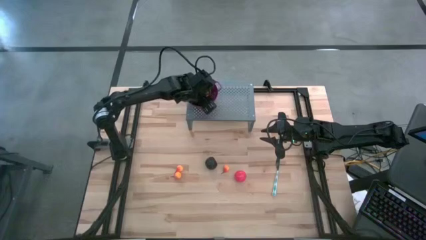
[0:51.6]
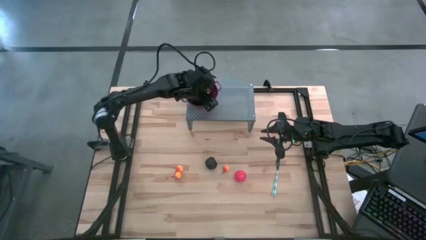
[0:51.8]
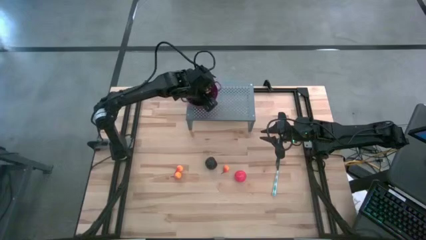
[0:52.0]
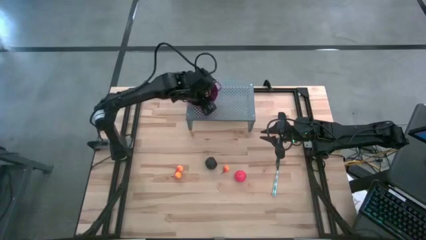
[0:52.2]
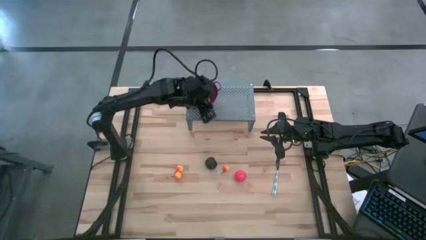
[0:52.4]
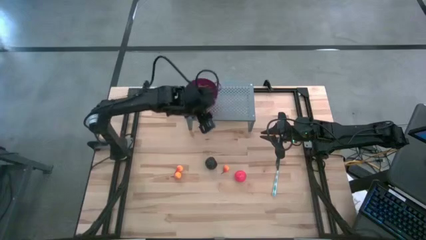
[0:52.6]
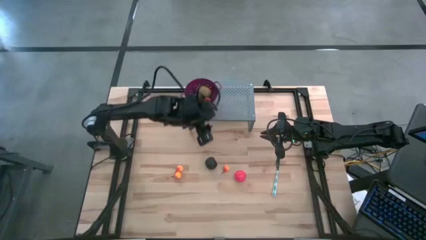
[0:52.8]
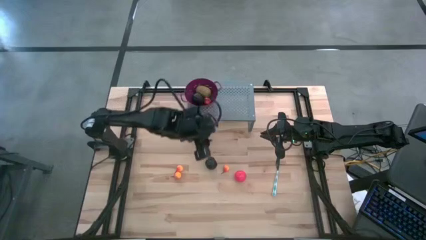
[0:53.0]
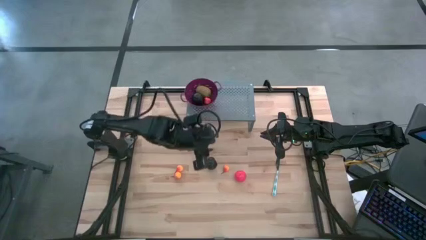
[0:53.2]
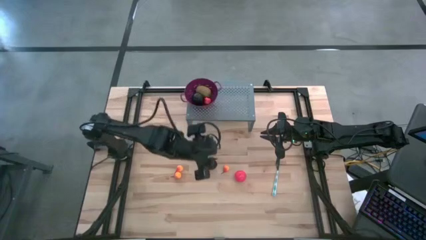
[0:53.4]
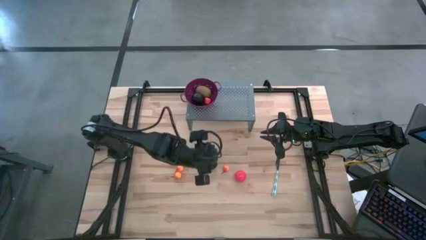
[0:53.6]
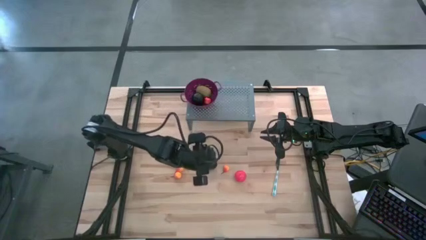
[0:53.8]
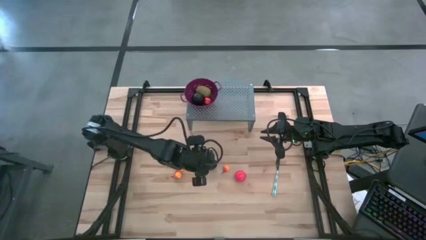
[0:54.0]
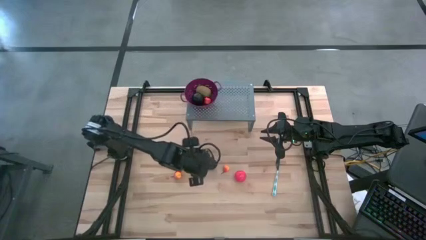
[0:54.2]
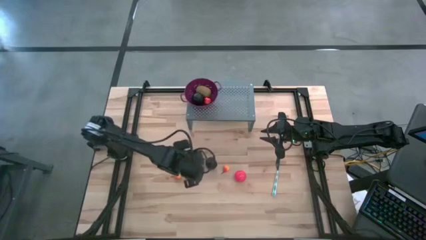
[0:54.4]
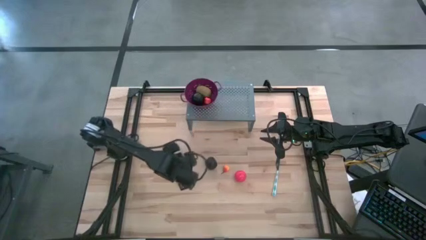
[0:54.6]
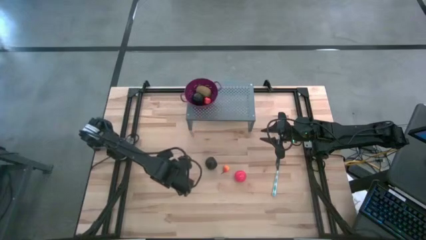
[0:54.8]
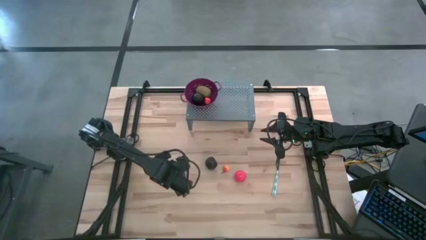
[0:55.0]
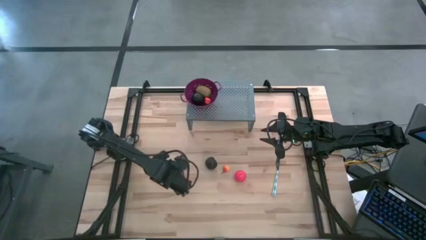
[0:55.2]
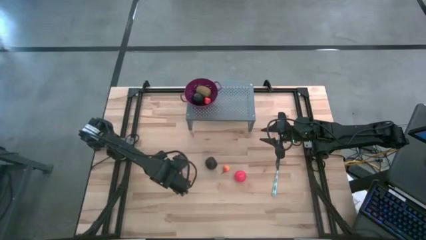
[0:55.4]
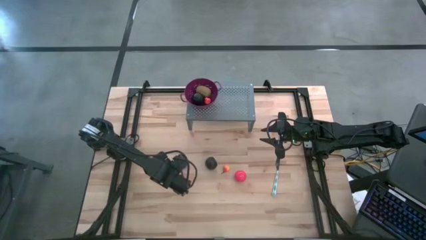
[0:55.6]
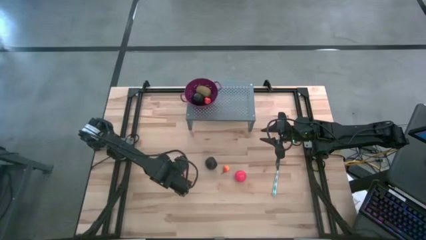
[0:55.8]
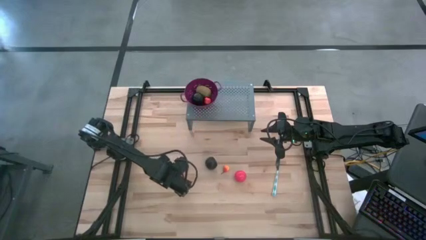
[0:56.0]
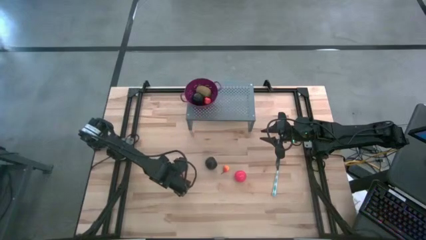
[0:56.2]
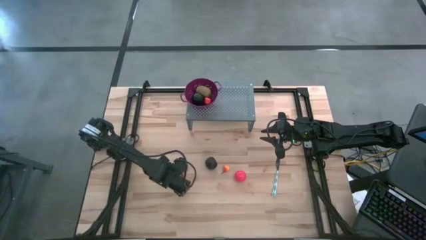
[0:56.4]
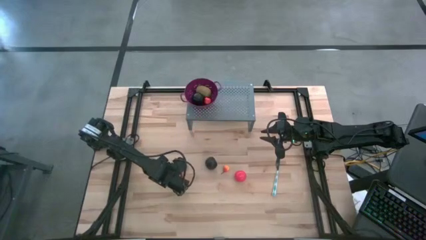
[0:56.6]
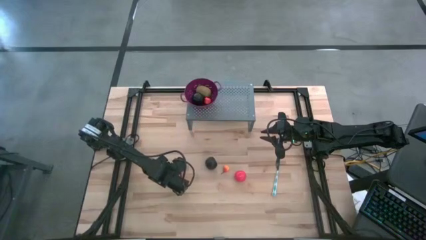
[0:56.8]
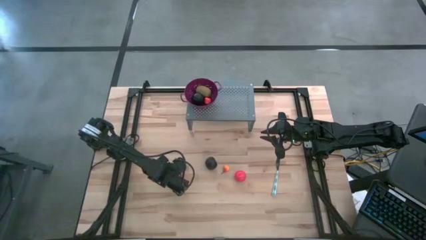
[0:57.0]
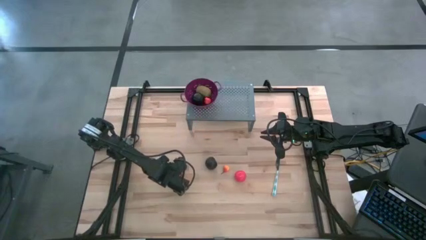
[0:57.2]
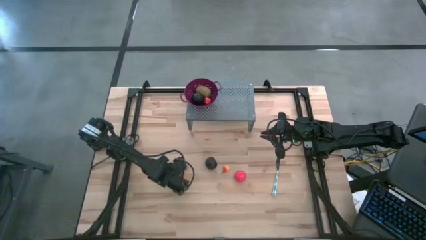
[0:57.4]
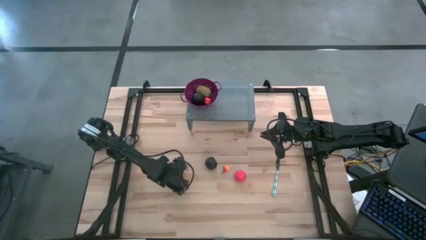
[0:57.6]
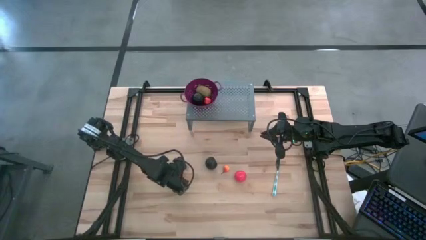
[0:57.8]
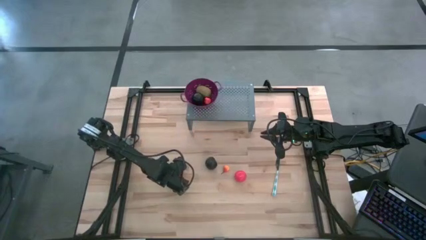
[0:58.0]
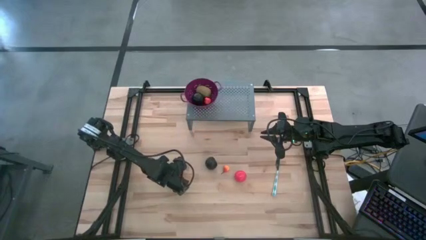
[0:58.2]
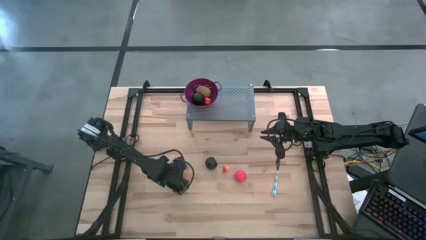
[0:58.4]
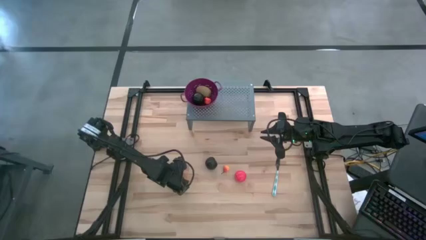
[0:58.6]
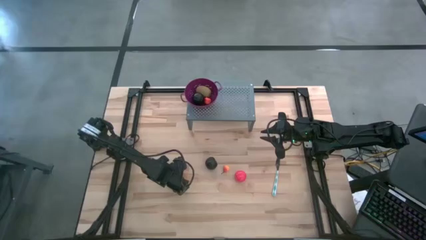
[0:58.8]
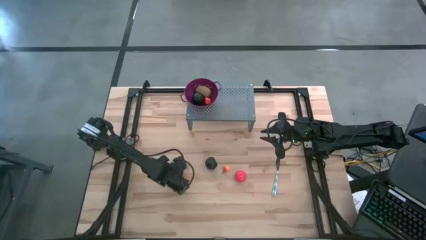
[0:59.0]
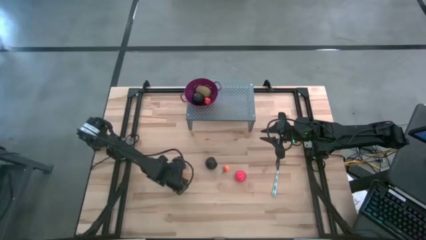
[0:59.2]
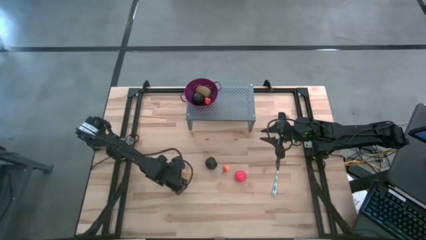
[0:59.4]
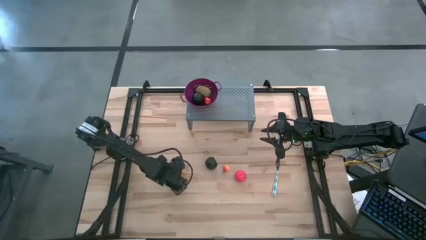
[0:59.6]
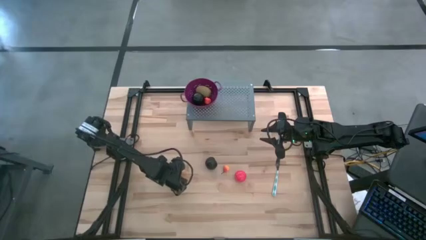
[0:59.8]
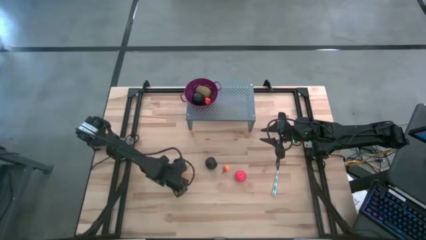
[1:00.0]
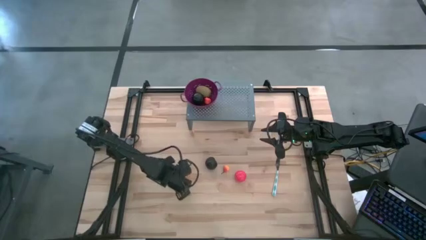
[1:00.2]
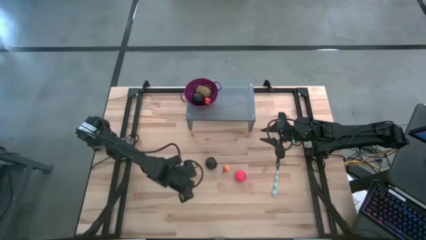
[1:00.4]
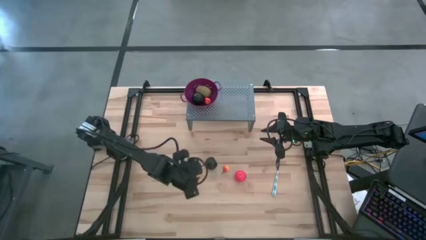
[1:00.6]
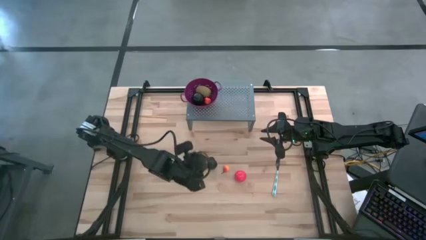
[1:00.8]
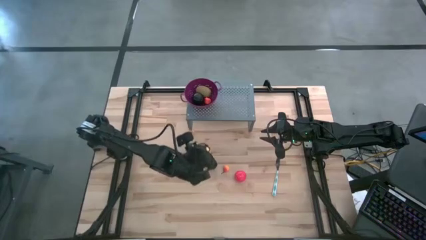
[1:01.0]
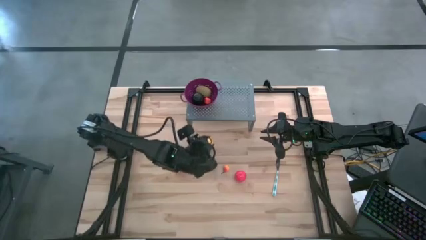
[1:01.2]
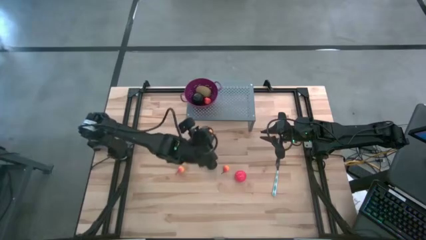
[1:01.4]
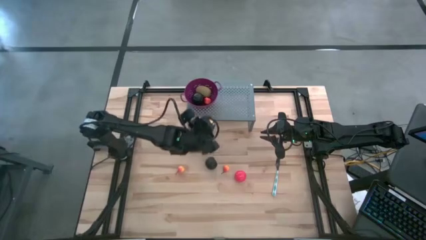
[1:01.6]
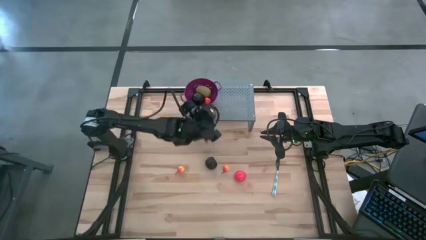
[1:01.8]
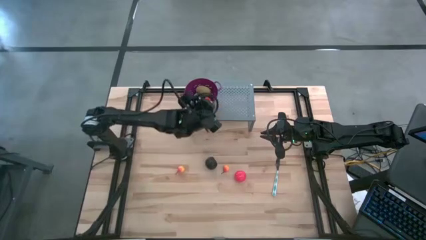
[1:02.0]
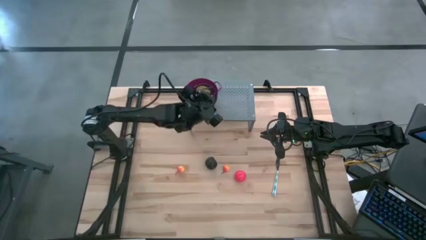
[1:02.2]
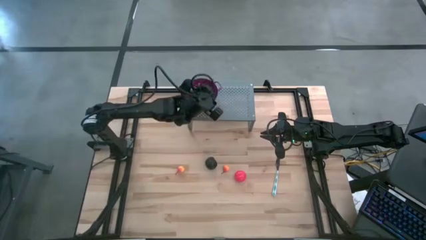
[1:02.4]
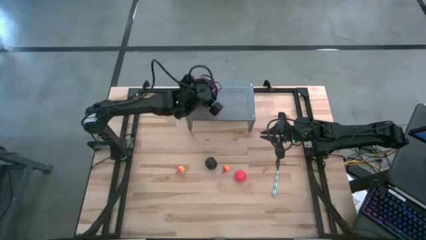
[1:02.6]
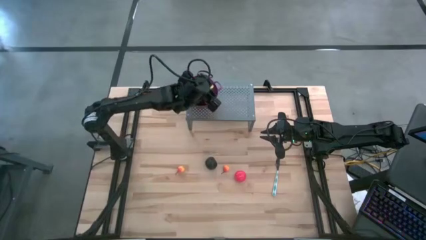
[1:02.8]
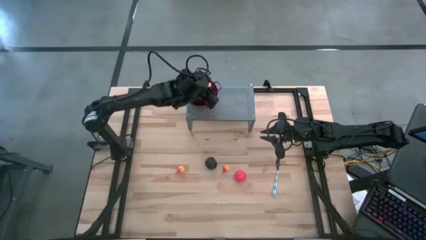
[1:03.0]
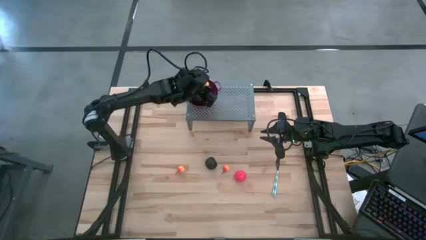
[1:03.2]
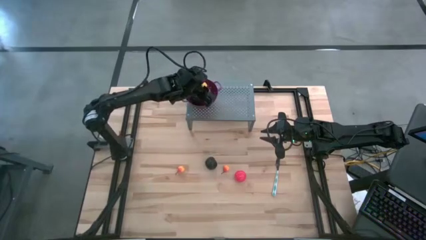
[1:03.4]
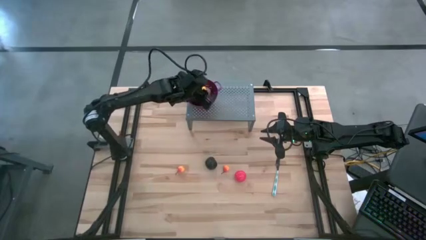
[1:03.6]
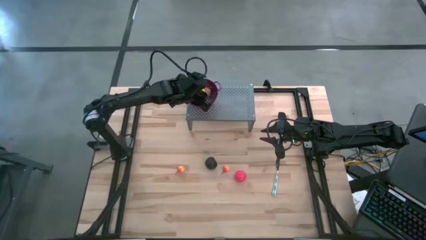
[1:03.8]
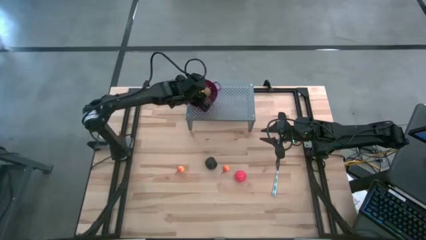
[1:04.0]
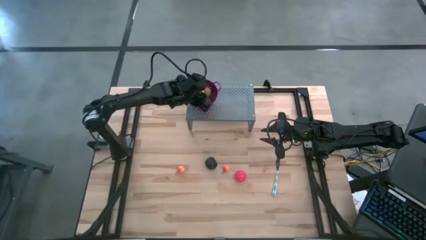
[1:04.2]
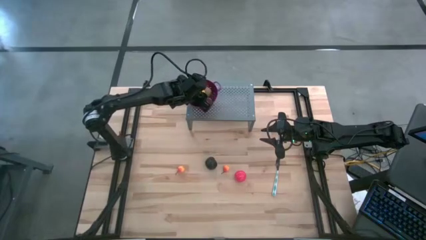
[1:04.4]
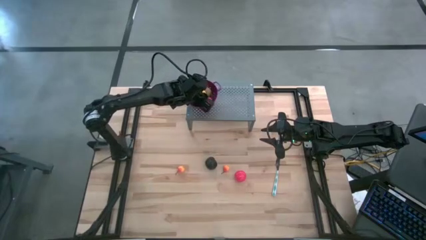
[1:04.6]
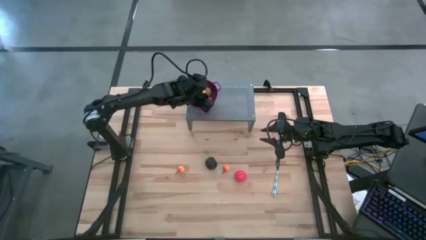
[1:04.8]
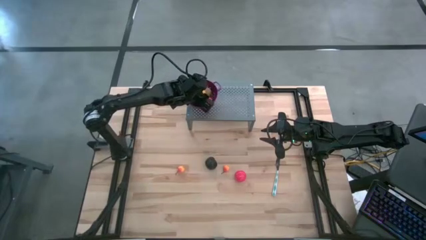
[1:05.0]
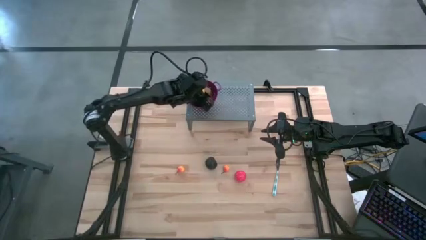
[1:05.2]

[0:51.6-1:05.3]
Task: Pick & Place Fruit
Put the yellow pear into the purple strainer bowl on the shelf

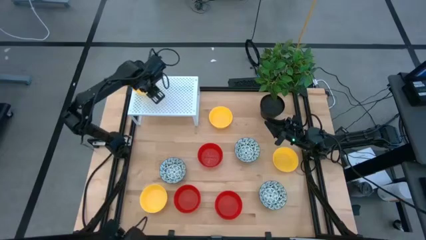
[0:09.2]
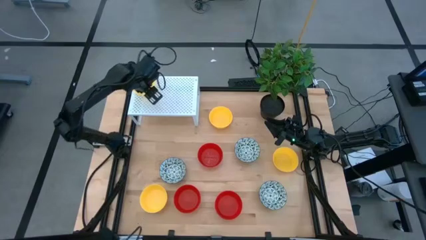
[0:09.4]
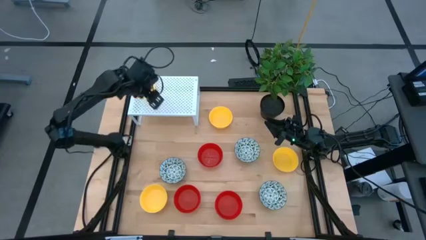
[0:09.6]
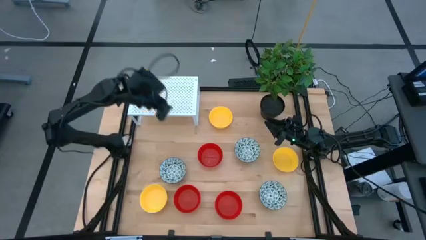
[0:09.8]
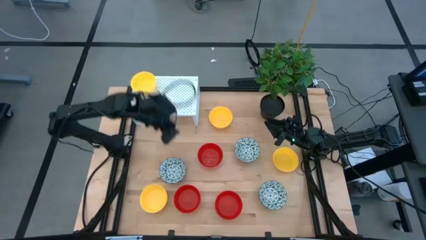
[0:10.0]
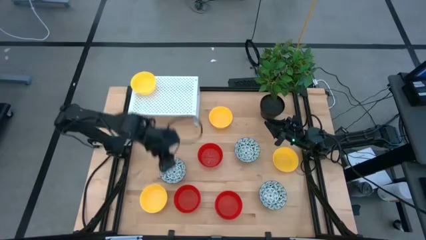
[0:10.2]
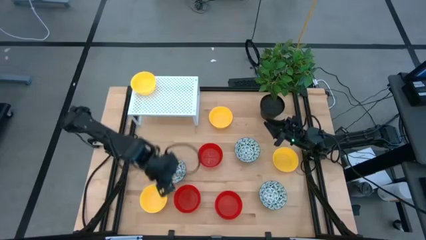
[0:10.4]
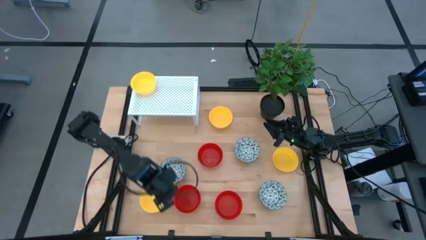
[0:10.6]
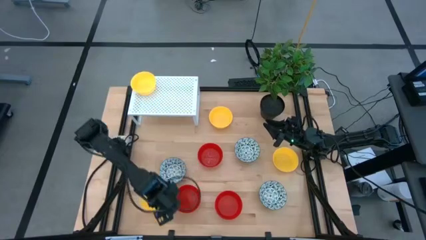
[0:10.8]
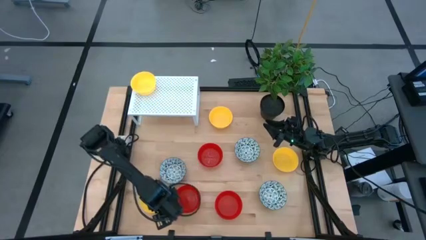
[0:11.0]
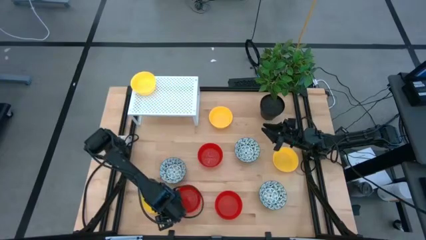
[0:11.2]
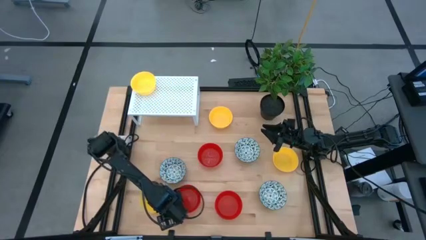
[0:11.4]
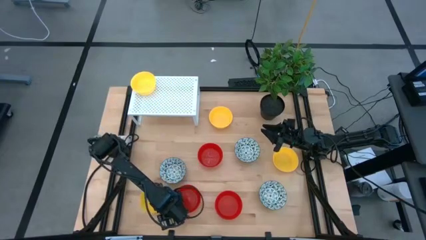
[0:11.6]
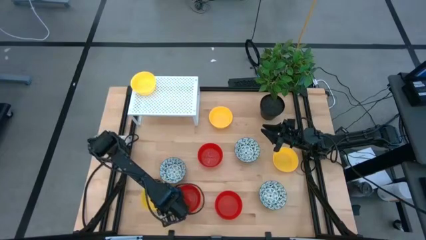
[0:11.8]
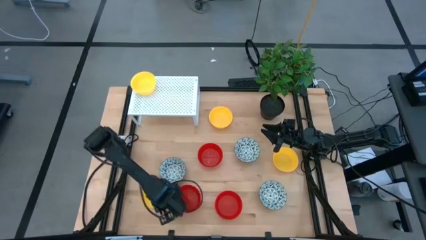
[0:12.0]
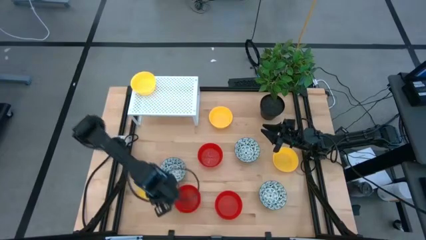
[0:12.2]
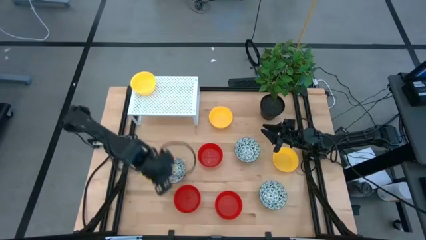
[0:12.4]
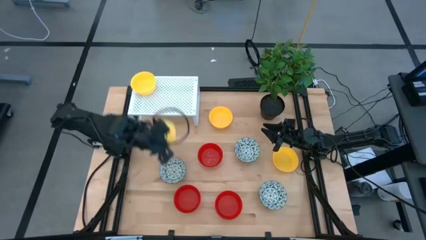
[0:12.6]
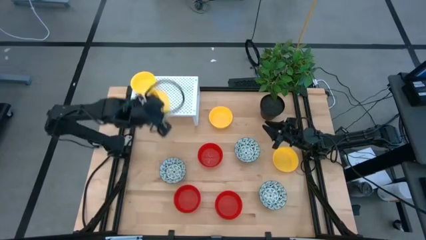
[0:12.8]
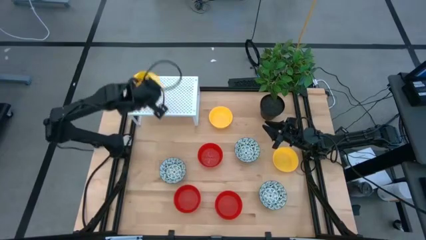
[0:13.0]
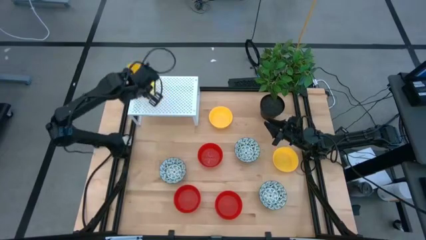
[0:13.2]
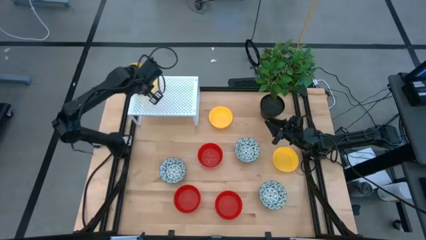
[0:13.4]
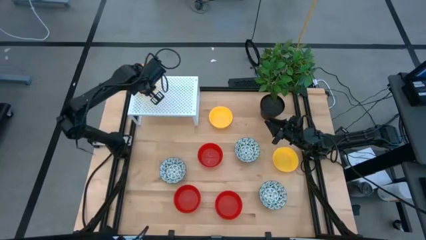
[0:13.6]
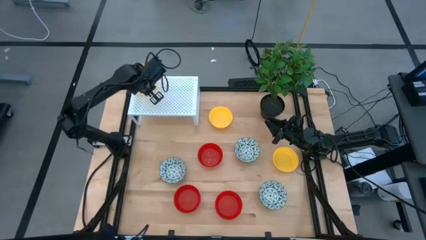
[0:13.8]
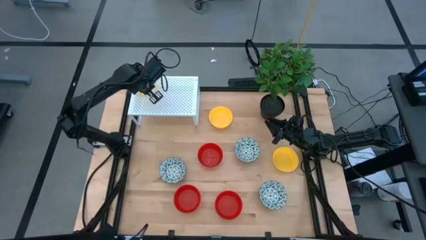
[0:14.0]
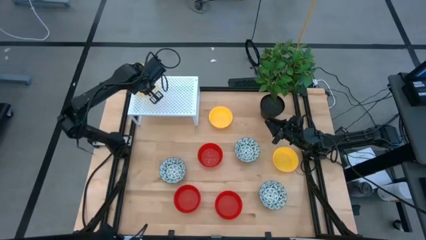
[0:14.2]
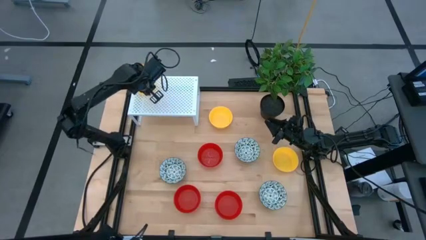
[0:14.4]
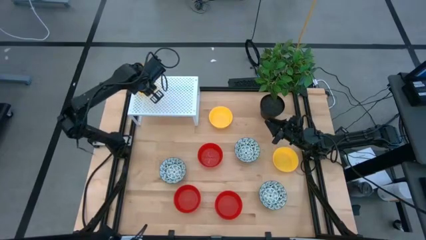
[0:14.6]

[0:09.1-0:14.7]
Task: Pick & Place Mini bowls
Stack the yellow bowl on top of the yellow bowl on the shelf
